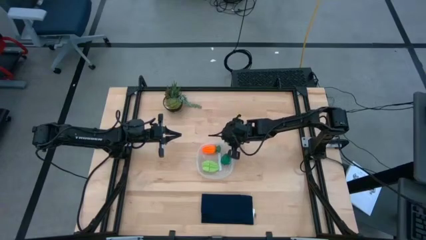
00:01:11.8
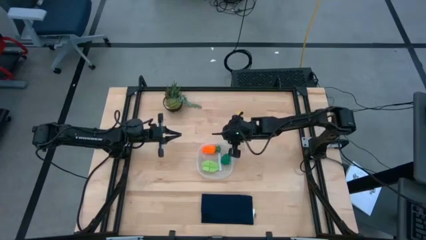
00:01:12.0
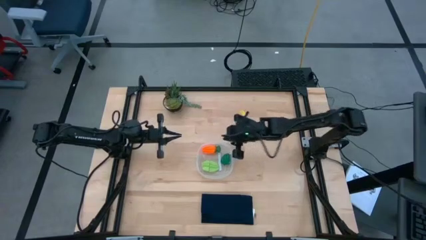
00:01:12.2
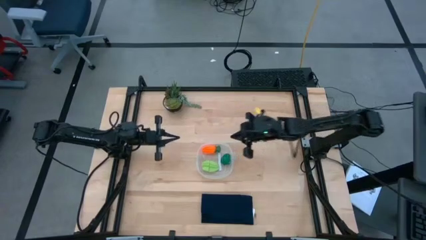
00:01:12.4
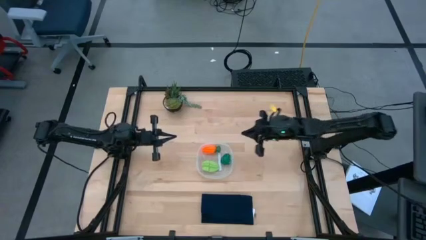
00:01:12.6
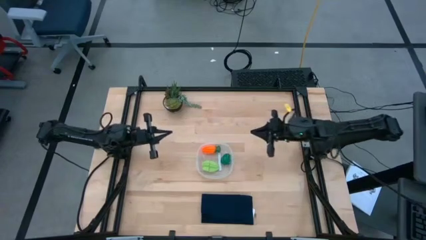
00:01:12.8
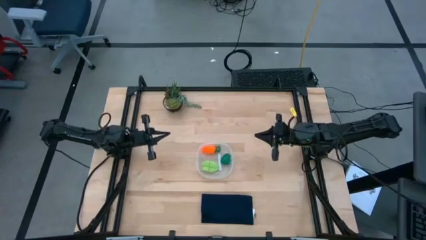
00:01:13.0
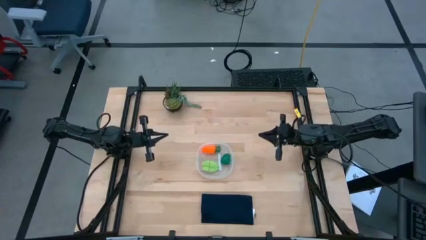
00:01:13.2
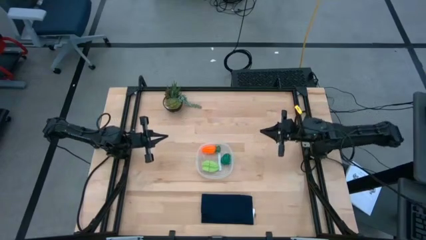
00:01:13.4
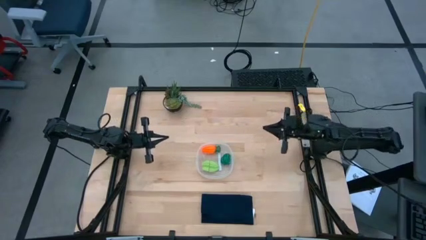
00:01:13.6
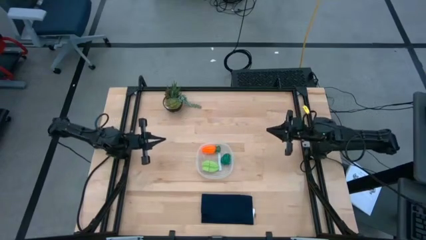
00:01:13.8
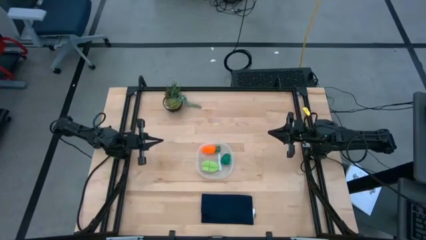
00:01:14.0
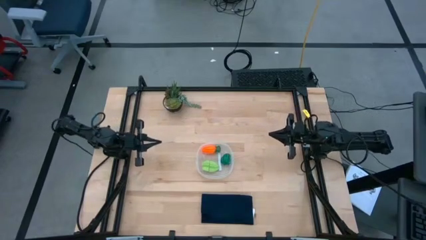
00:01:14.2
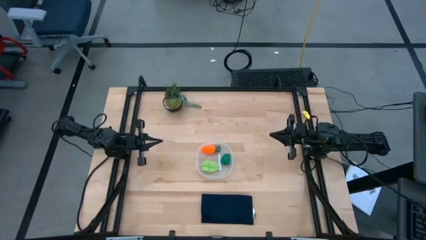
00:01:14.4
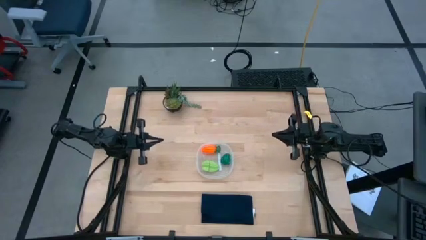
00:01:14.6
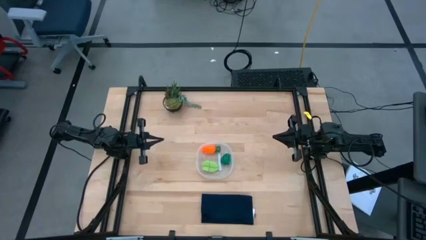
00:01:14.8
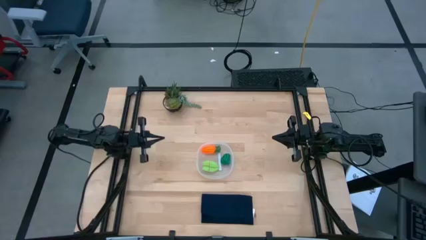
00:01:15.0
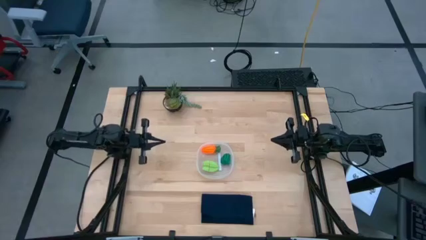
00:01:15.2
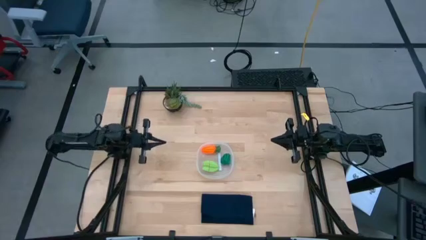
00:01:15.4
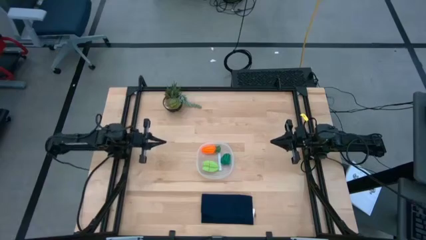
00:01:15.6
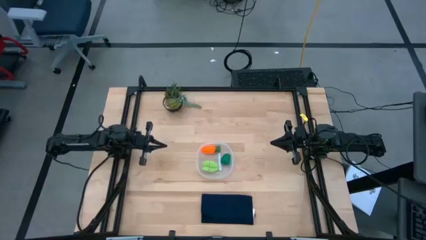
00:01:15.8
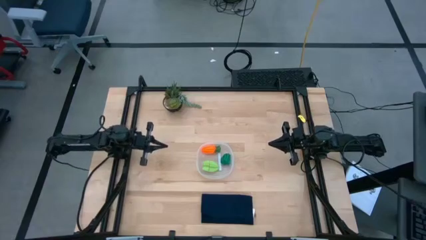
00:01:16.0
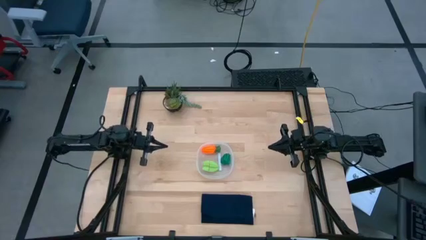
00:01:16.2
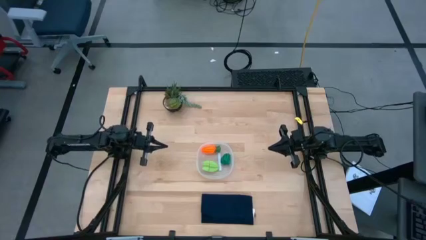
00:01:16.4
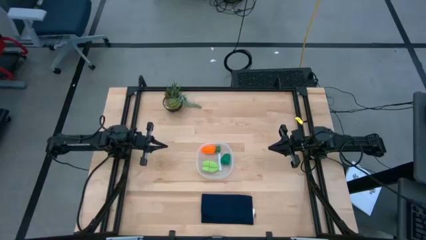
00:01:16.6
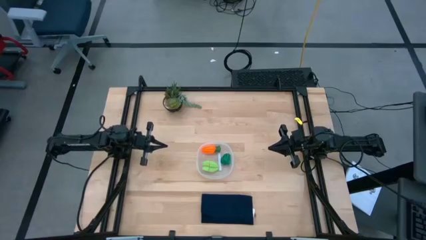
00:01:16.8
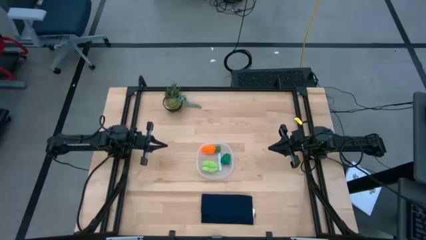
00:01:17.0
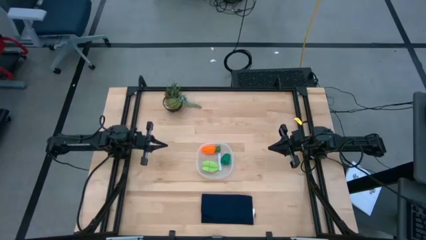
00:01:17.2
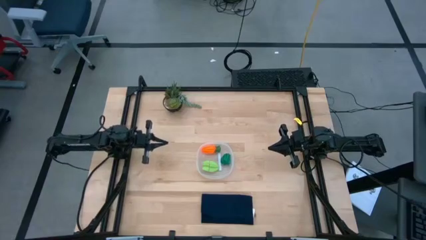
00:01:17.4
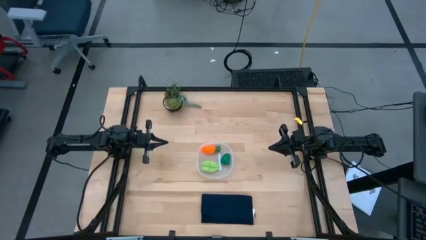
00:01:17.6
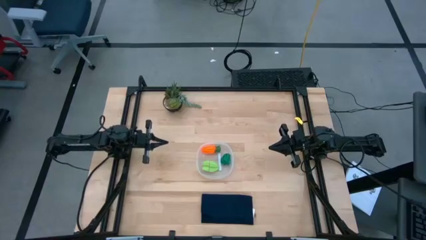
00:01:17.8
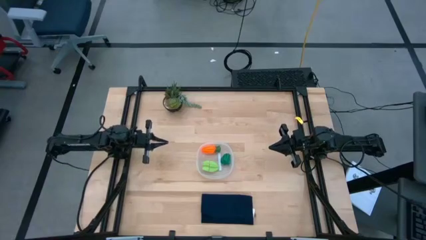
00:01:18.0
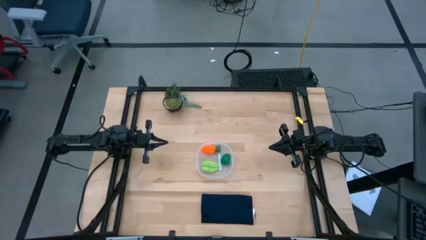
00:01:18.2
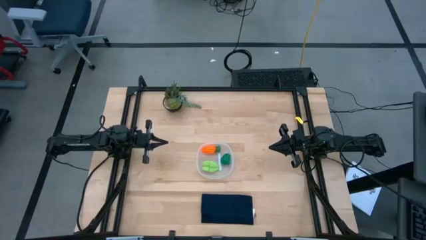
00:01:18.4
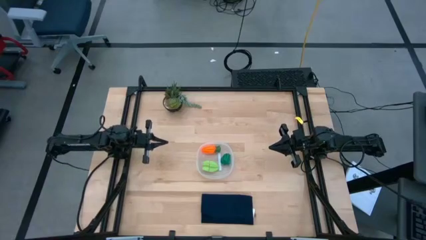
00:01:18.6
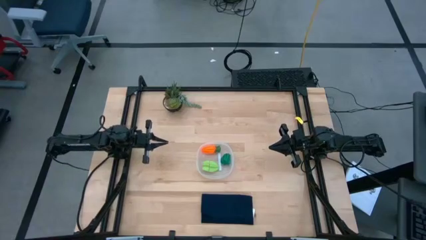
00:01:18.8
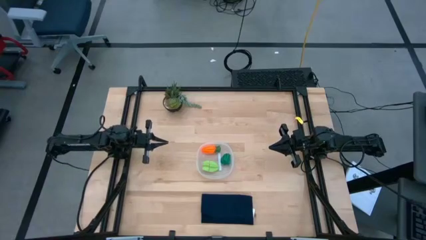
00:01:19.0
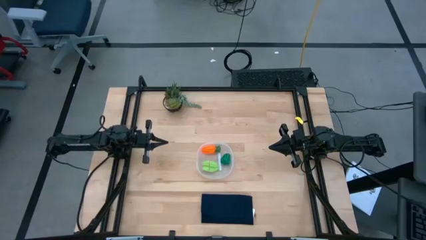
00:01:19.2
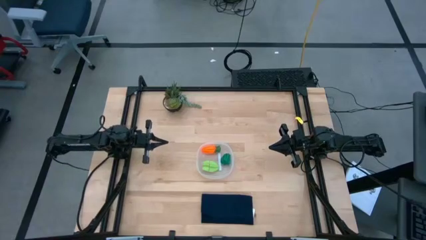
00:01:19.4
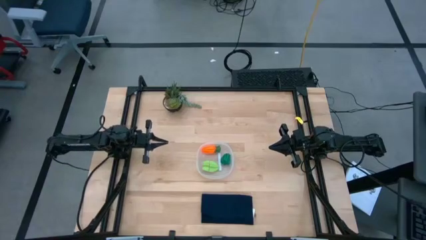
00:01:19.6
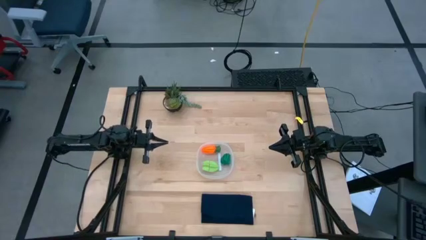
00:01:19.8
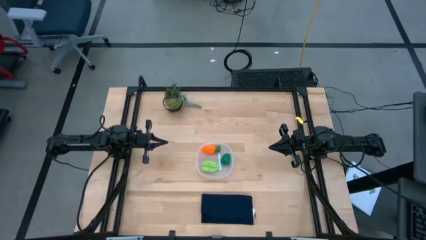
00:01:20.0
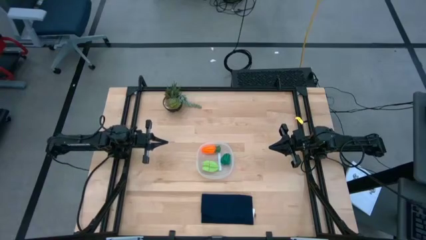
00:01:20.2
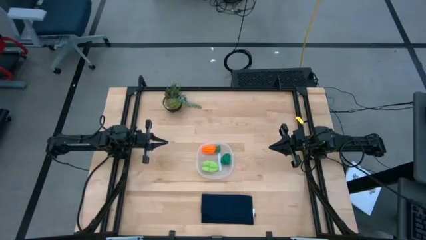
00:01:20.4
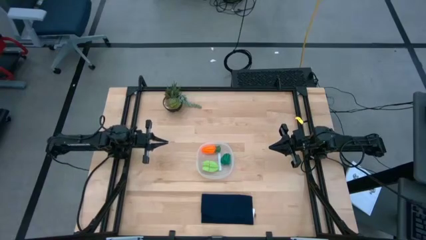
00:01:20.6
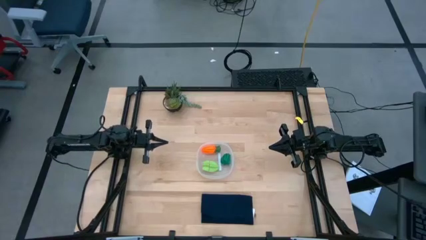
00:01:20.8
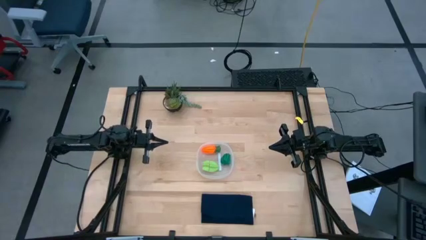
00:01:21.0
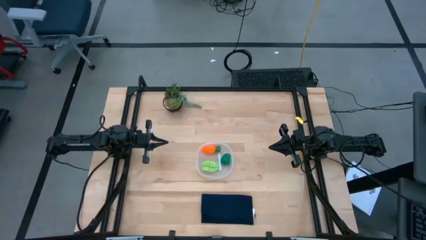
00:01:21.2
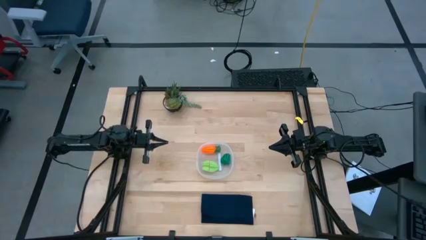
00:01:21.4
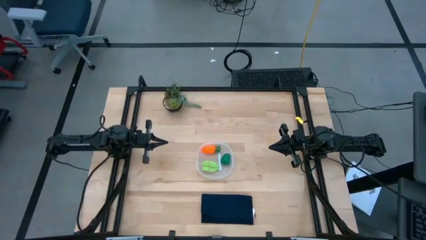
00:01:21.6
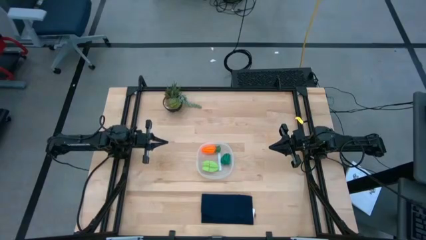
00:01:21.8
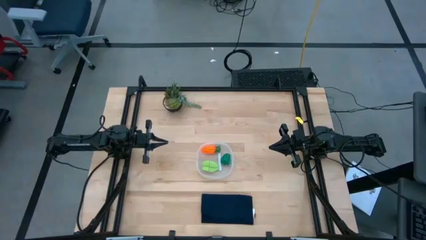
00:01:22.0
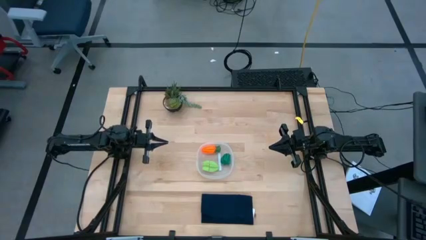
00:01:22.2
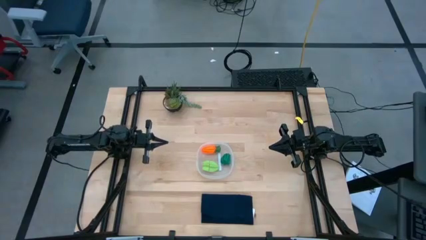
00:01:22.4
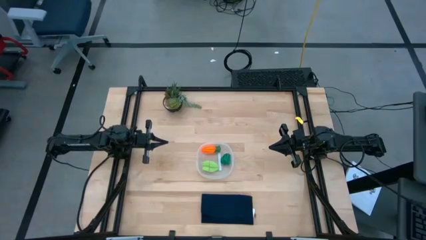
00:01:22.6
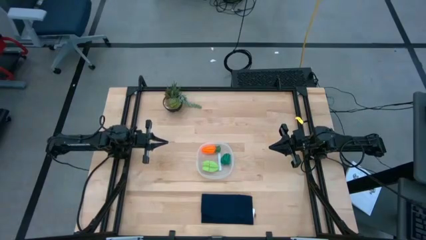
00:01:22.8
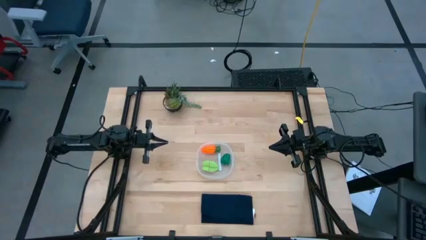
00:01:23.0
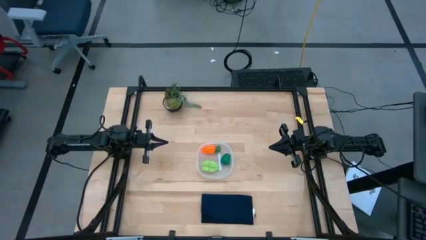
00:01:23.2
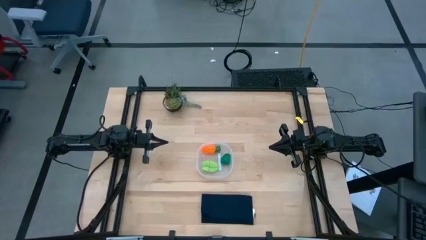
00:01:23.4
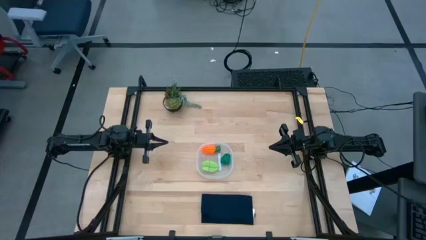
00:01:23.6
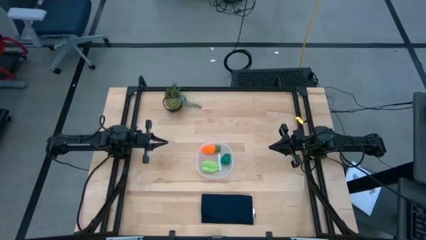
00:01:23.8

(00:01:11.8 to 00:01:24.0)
Task: Pick and placing Produce into tupperware
Return to Home Position
